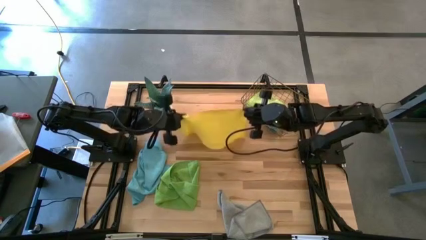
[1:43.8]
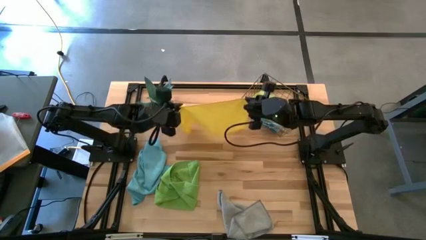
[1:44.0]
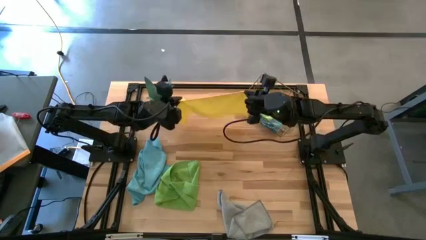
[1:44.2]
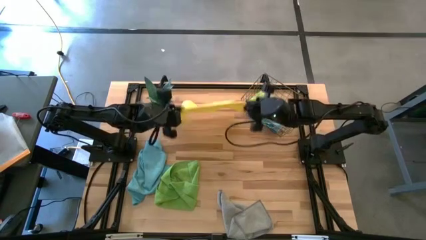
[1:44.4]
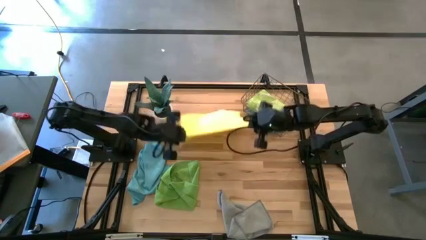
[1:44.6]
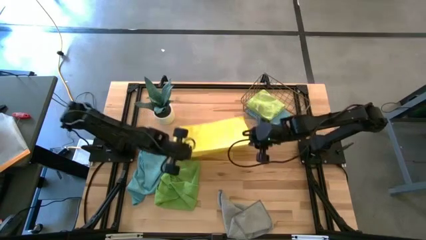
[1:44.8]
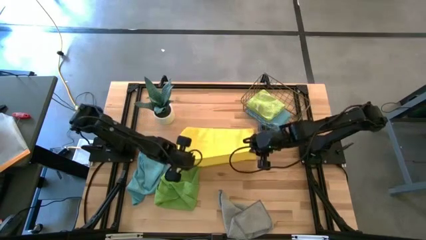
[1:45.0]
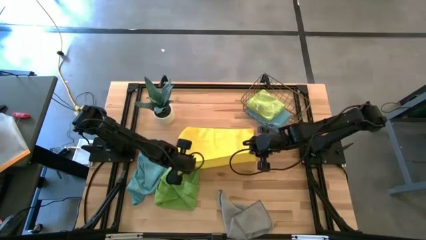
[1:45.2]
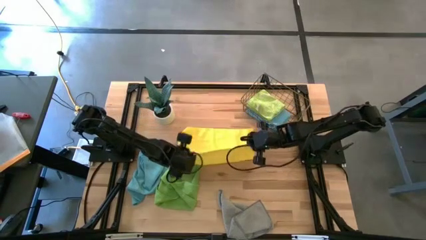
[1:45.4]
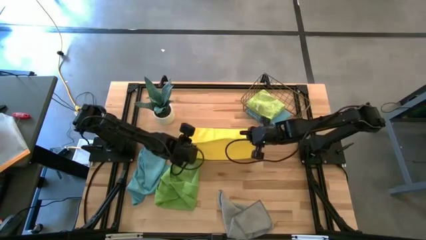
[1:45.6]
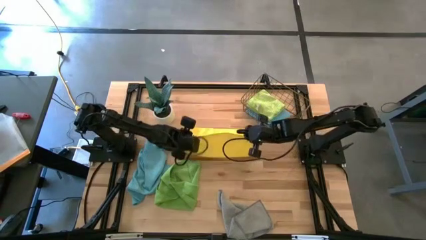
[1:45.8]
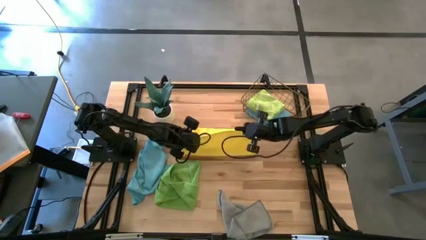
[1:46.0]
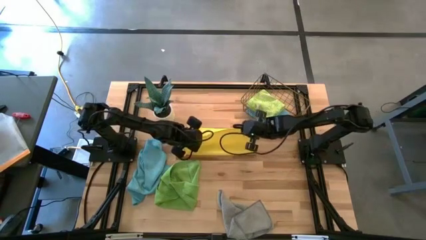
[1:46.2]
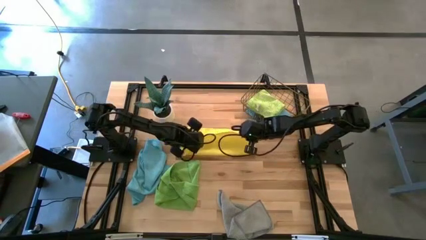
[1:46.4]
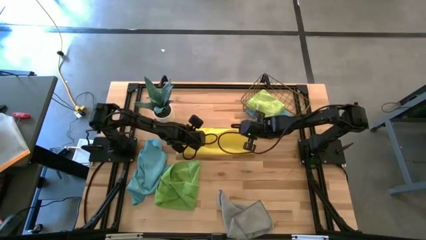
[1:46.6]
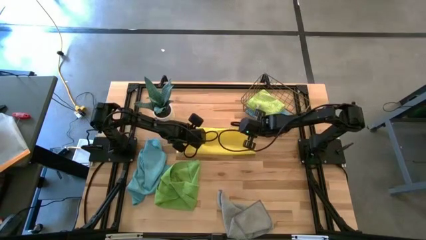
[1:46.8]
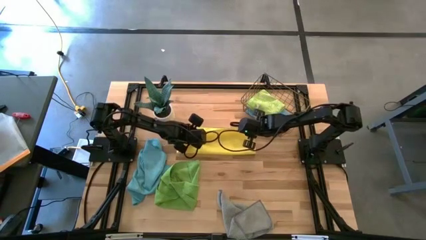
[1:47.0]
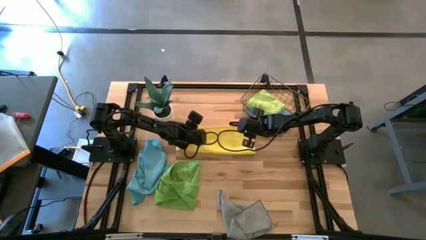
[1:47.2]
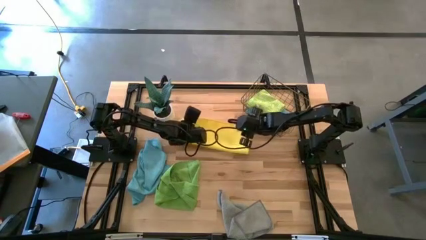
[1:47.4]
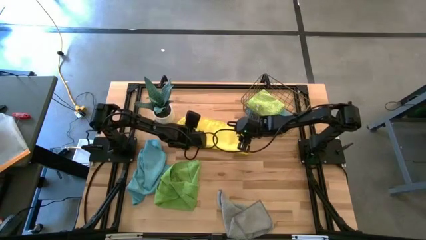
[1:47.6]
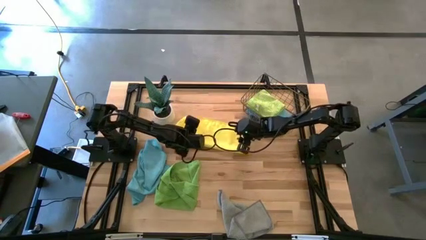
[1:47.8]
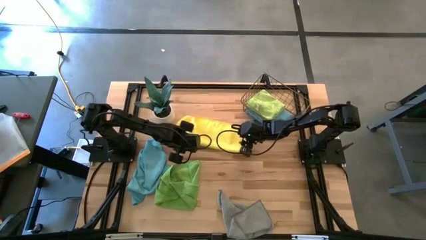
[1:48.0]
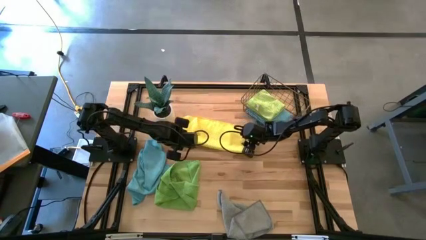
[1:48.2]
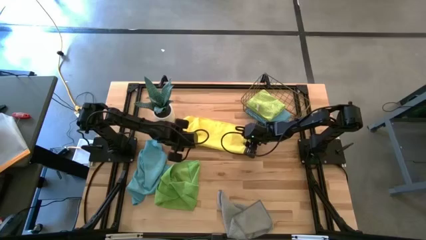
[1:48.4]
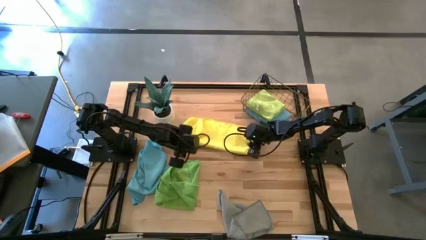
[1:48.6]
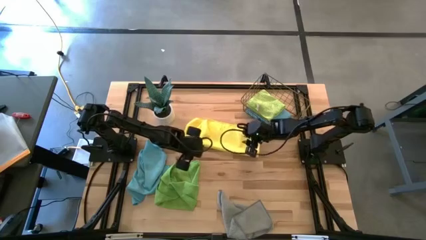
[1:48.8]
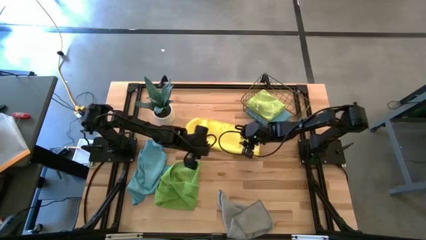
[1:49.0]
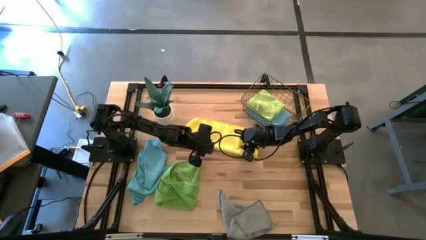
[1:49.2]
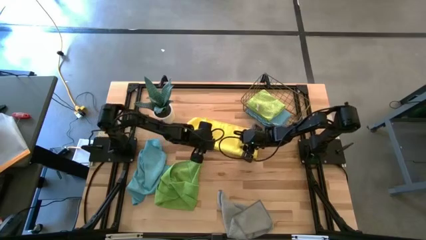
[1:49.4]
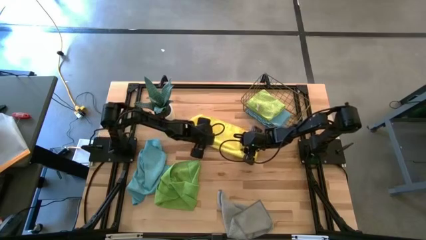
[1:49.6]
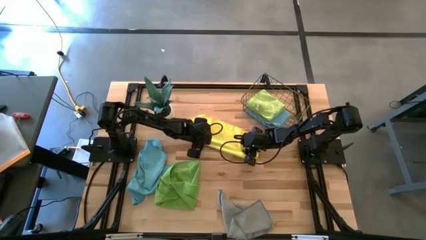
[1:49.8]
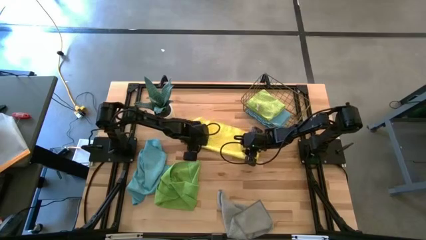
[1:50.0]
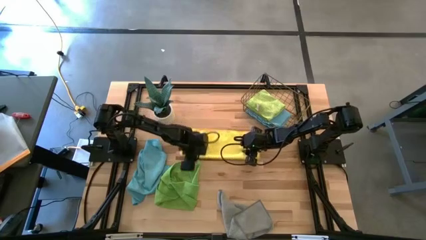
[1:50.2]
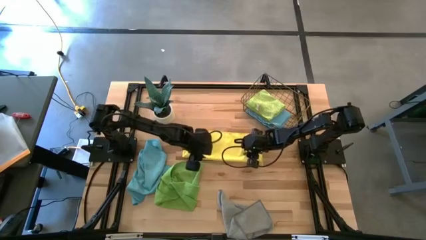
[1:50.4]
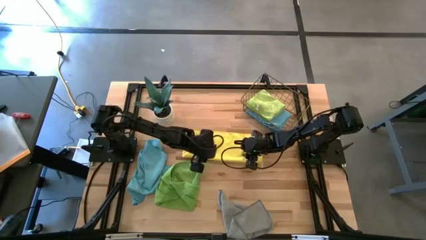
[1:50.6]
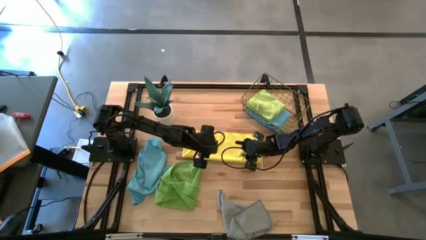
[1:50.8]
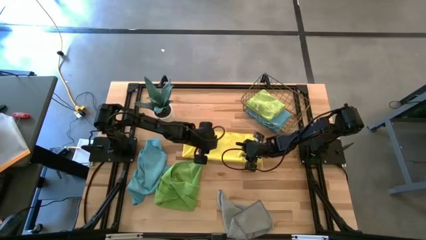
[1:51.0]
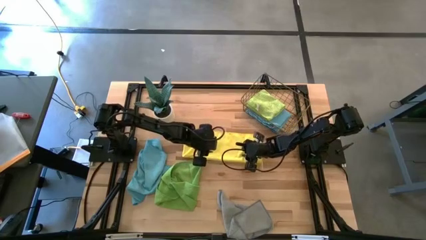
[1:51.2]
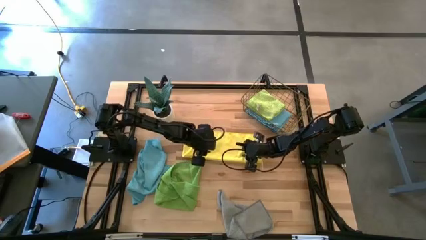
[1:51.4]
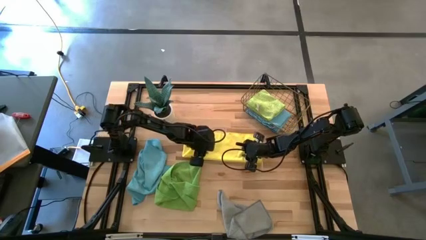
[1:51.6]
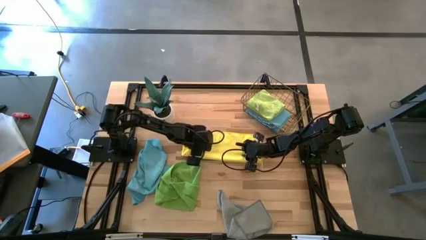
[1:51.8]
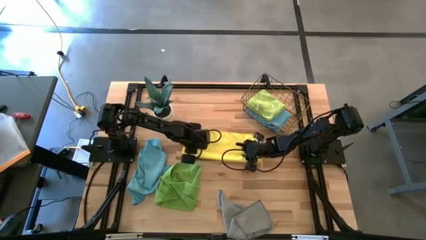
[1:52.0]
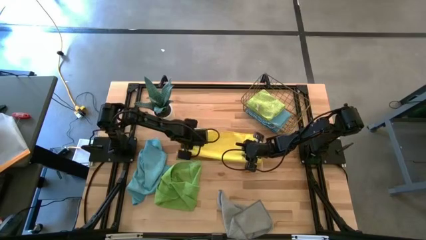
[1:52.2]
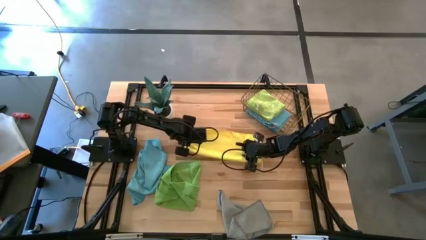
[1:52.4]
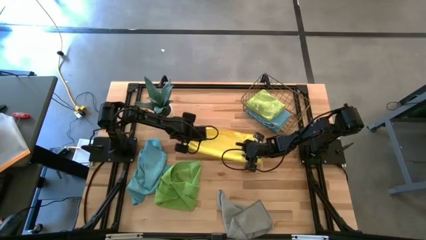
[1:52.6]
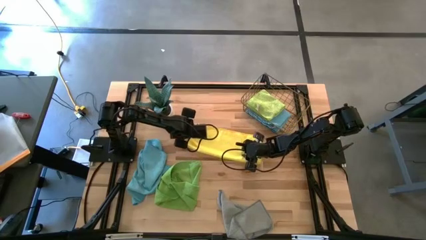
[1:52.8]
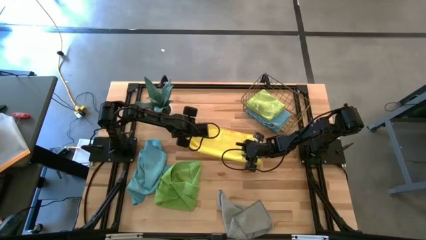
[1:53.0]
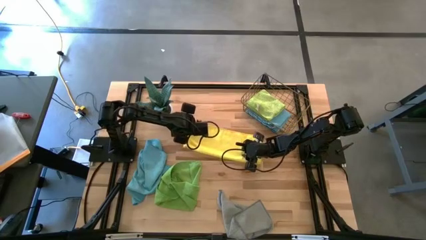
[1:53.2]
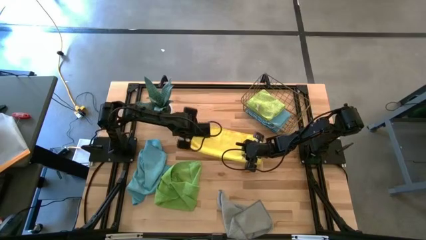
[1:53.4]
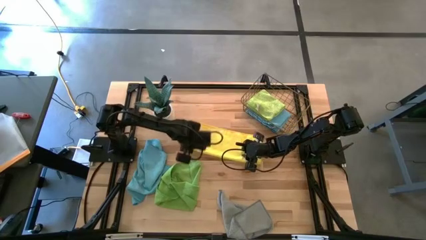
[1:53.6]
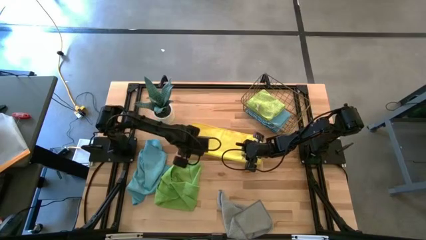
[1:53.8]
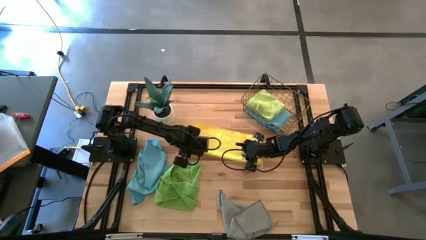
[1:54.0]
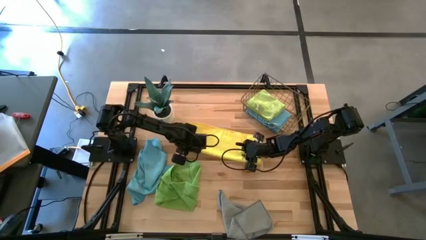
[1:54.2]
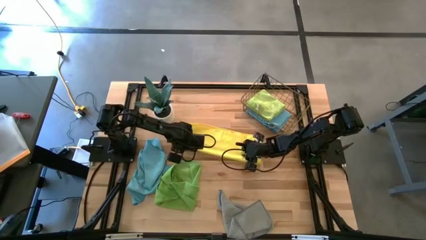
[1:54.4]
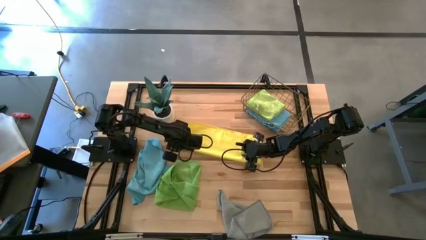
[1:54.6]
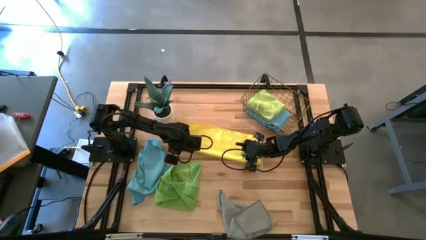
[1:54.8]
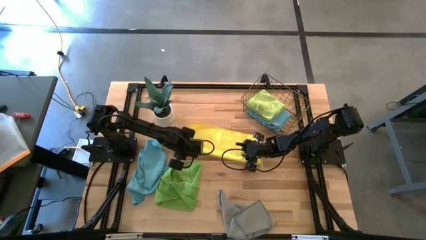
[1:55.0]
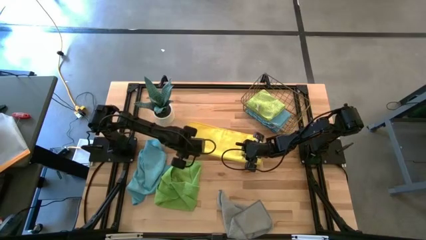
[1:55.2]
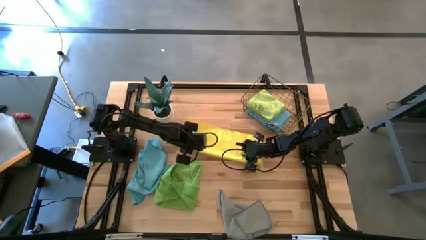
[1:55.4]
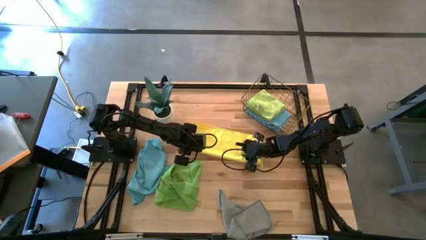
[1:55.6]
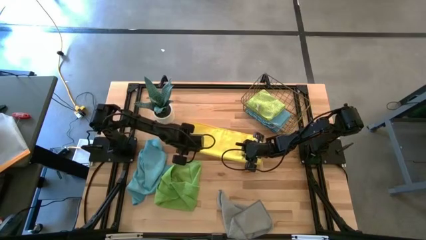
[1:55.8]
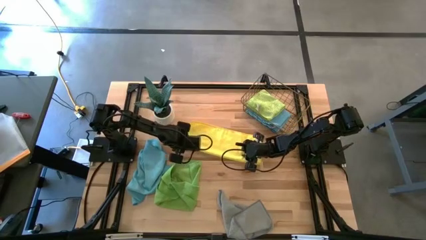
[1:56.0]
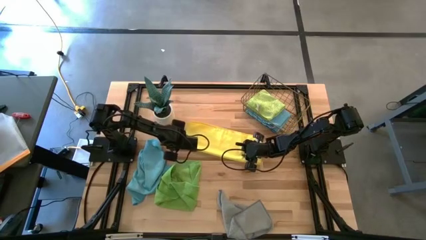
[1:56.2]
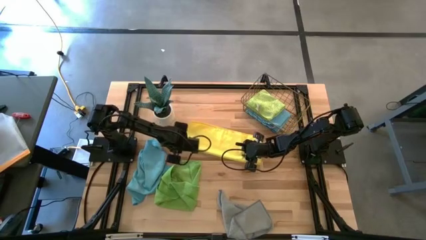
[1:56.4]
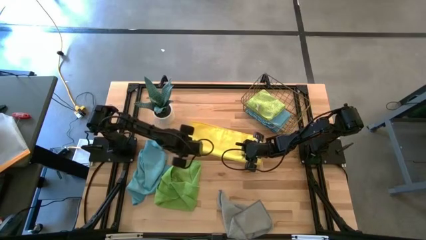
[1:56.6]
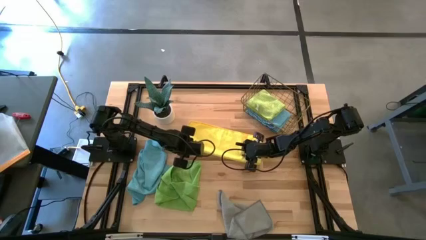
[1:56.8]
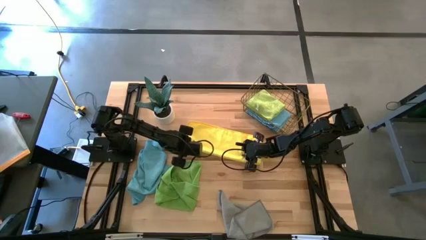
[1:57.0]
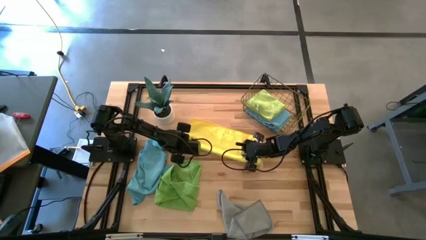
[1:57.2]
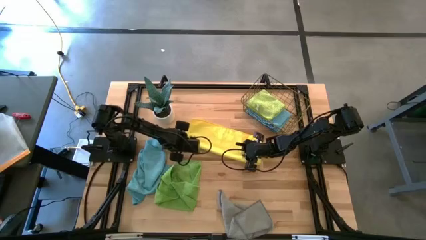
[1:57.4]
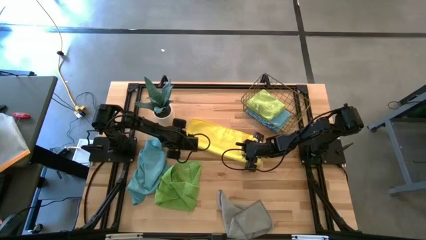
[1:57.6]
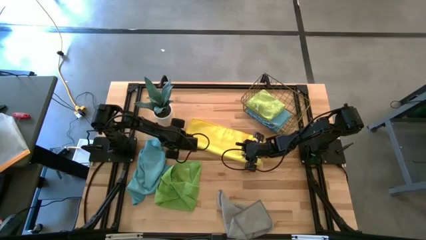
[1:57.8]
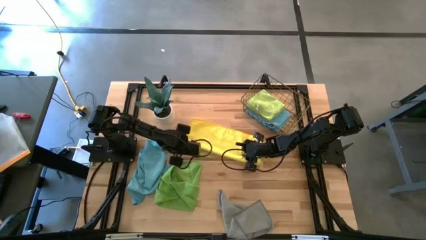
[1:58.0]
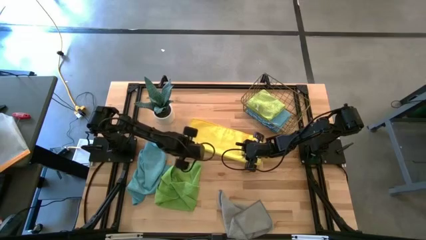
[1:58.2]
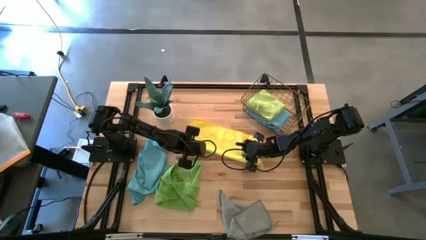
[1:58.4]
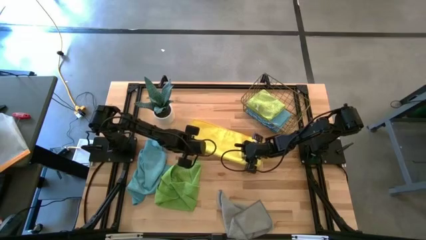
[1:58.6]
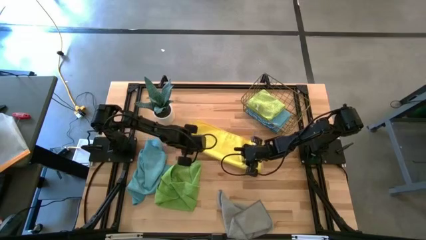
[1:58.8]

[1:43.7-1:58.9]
Task: Fold microfiber towels
Fold the yellow towel
